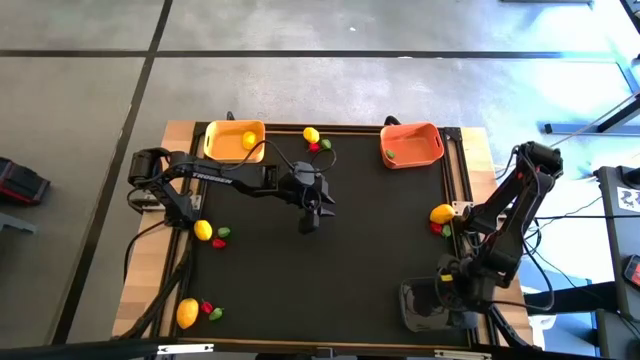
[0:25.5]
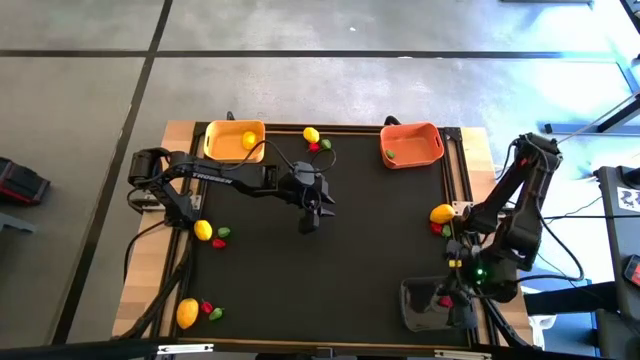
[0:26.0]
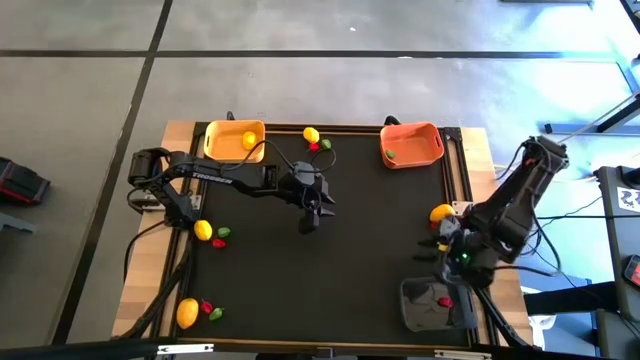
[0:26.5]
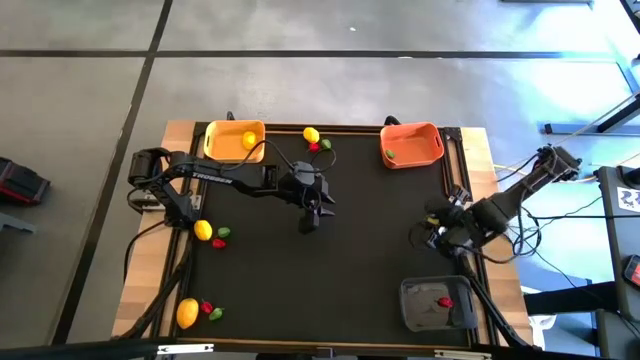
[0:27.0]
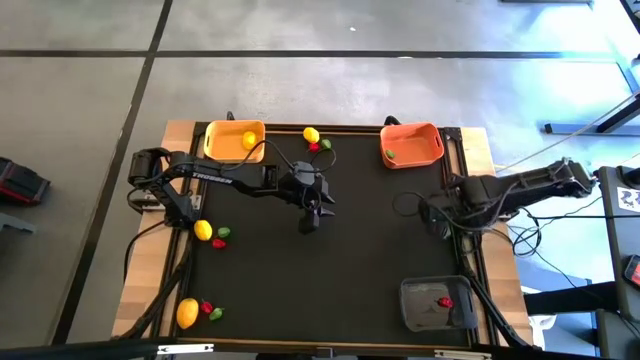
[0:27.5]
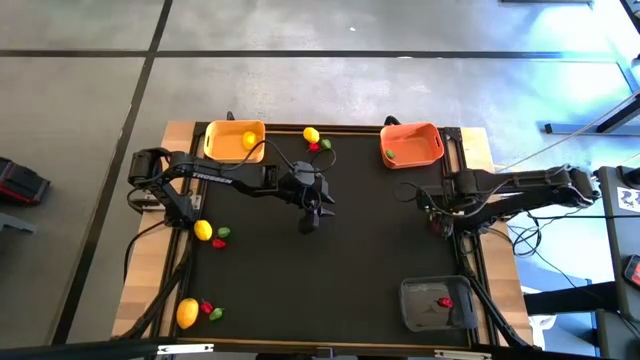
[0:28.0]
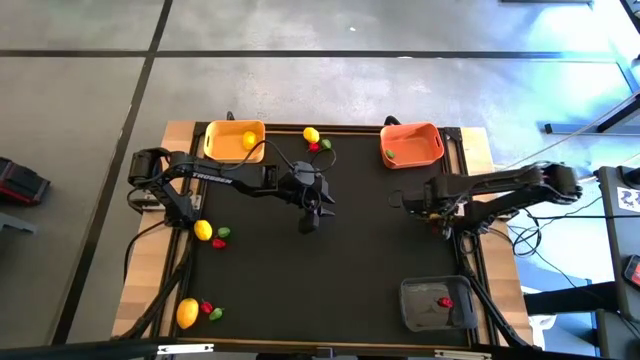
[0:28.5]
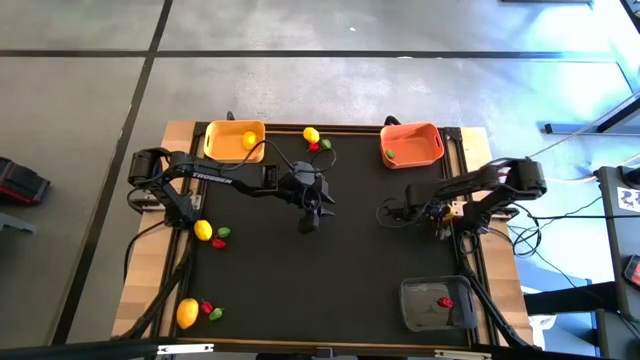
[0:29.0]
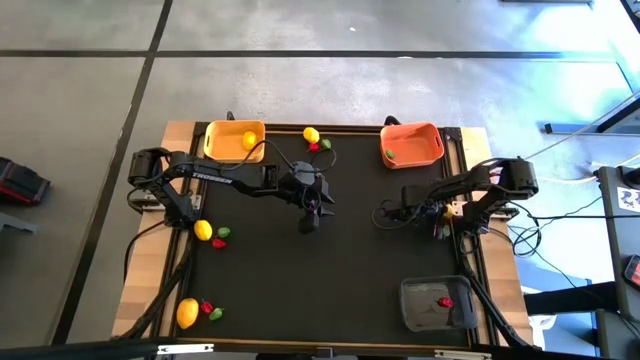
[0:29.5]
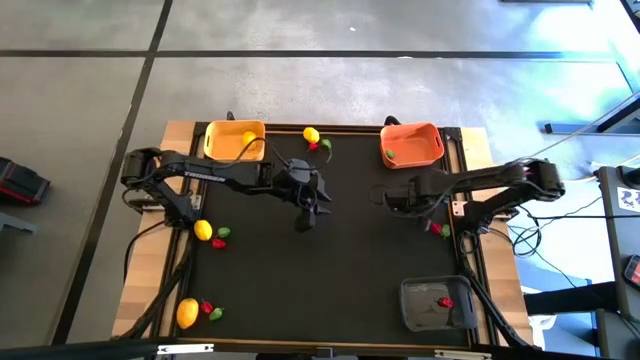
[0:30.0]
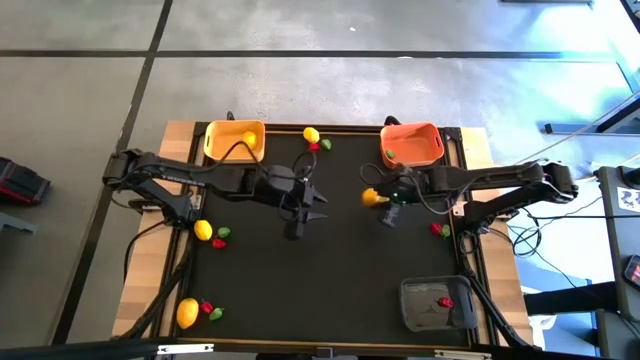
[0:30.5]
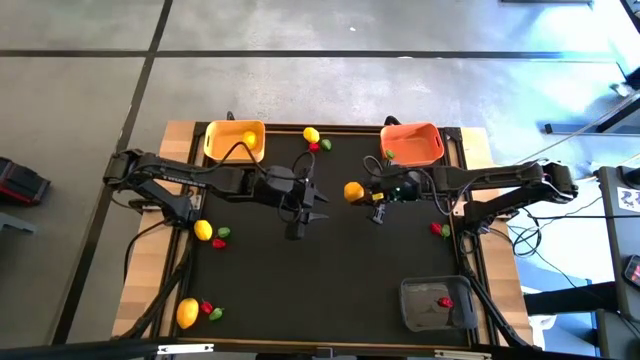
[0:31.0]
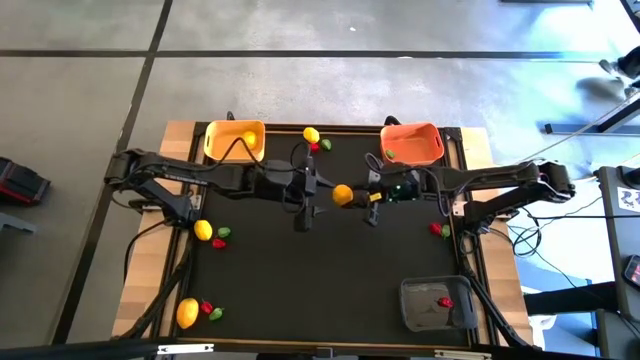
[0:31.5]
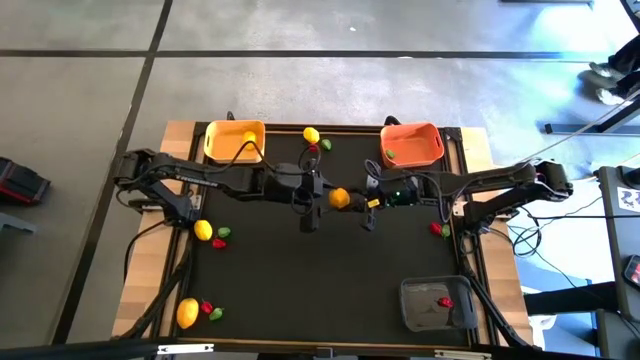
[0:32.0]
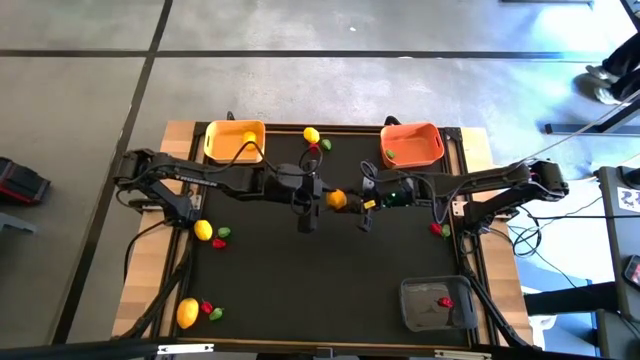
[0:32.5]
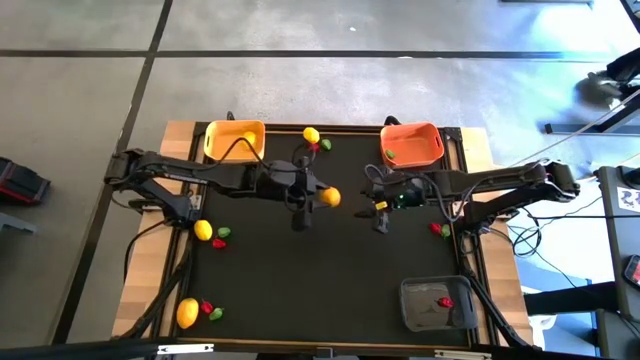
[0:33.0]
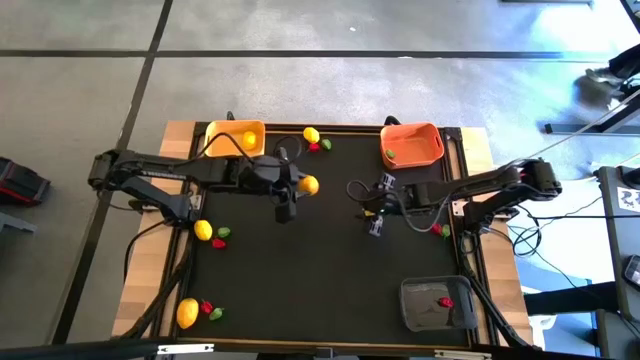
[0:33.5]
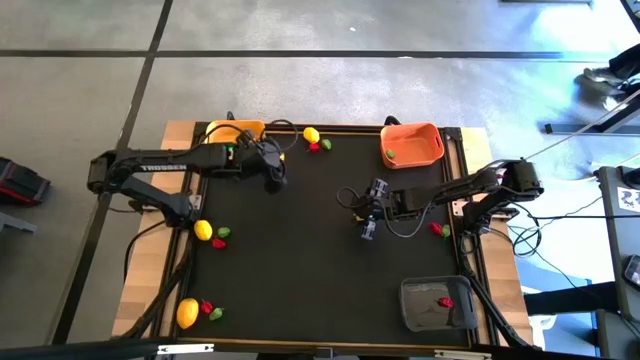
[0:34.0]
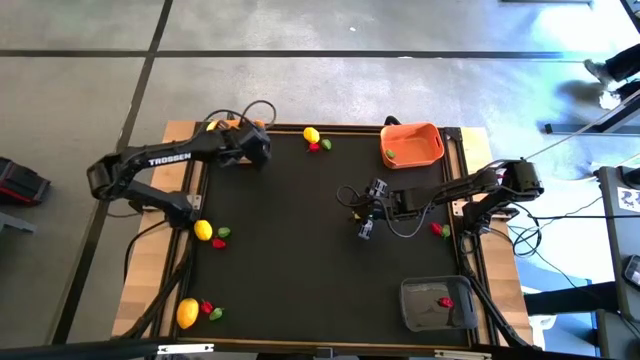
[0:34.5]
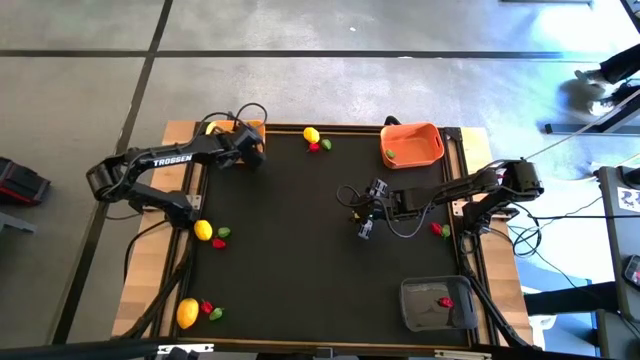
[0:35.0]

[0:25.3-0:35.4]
Task: Sort produce into baskets
Put the lemon into the yellow bin

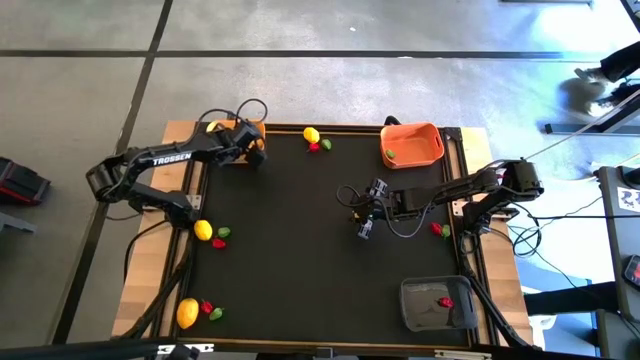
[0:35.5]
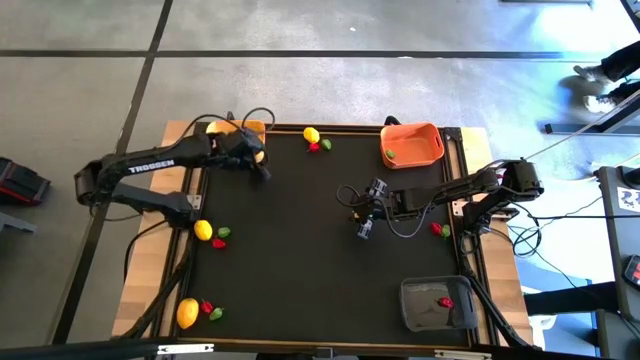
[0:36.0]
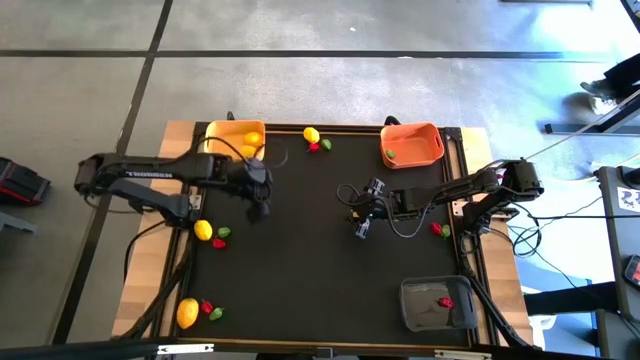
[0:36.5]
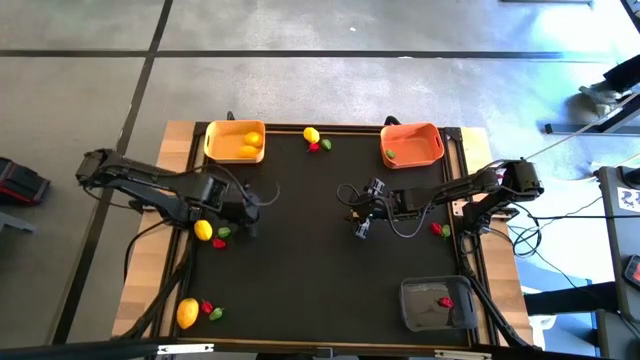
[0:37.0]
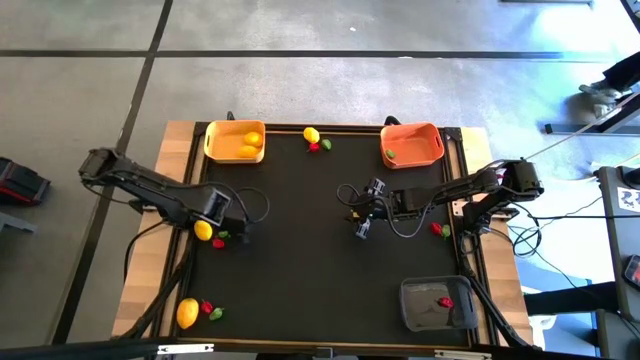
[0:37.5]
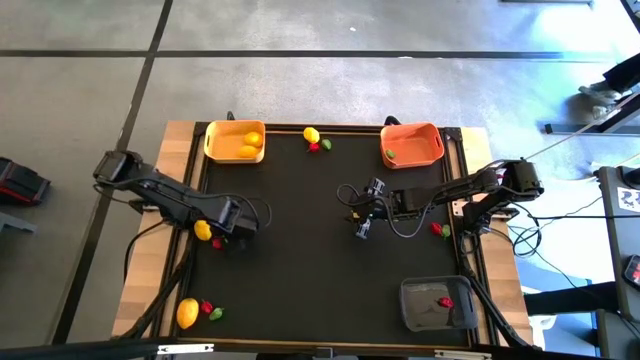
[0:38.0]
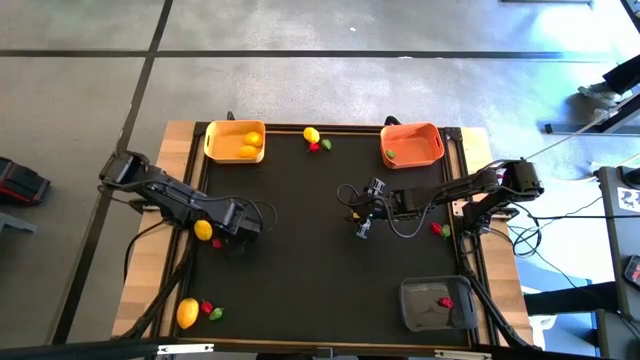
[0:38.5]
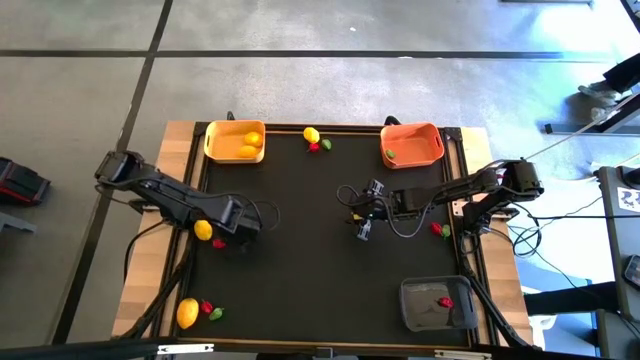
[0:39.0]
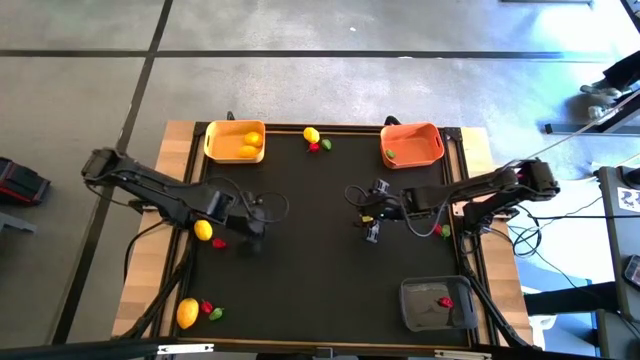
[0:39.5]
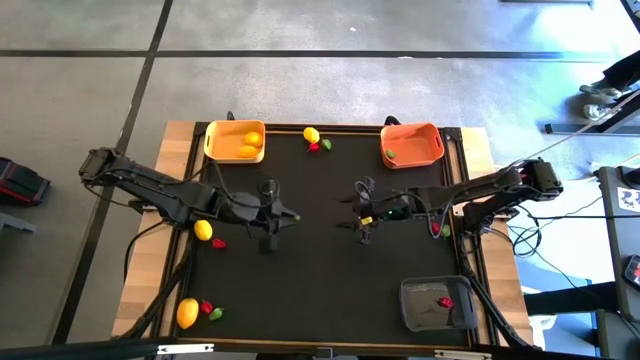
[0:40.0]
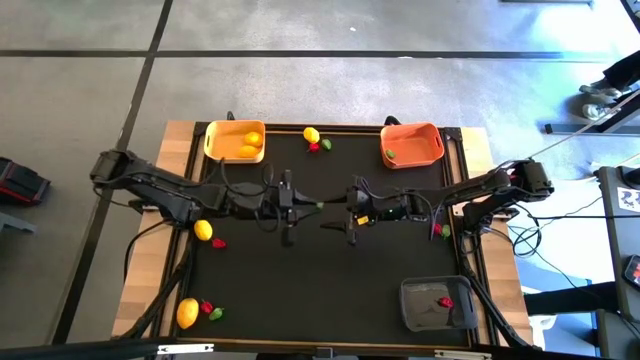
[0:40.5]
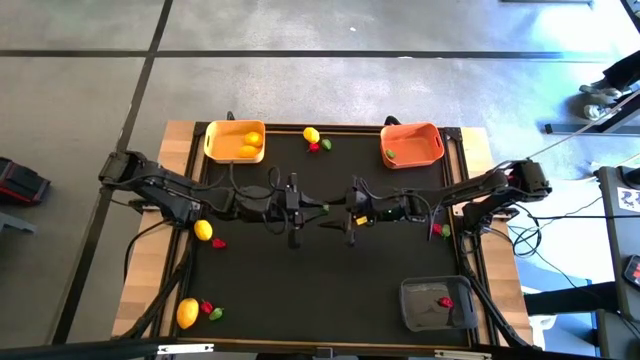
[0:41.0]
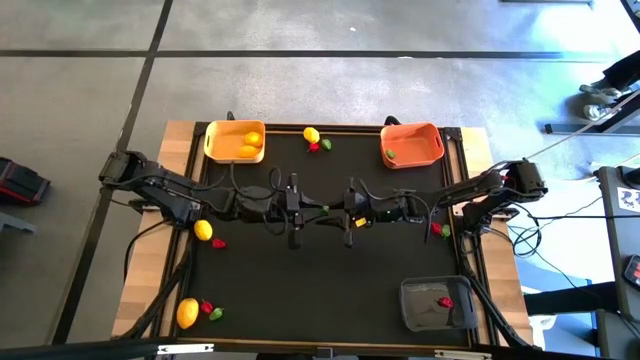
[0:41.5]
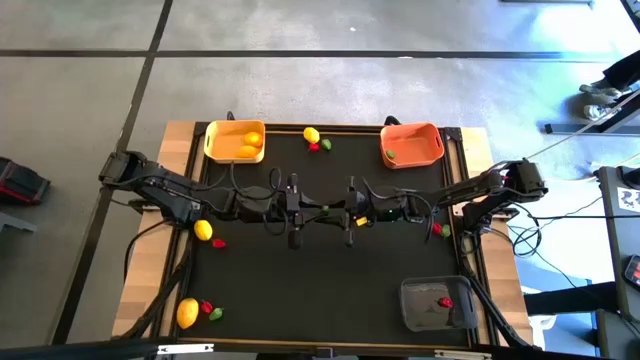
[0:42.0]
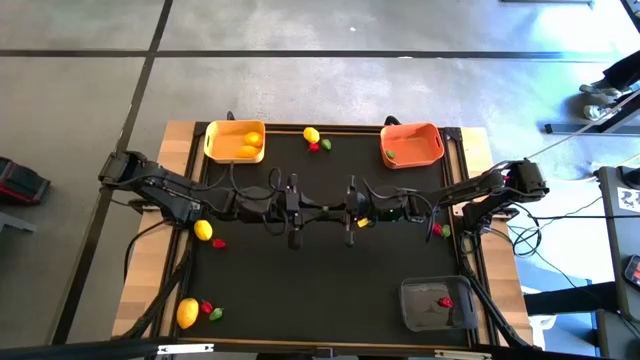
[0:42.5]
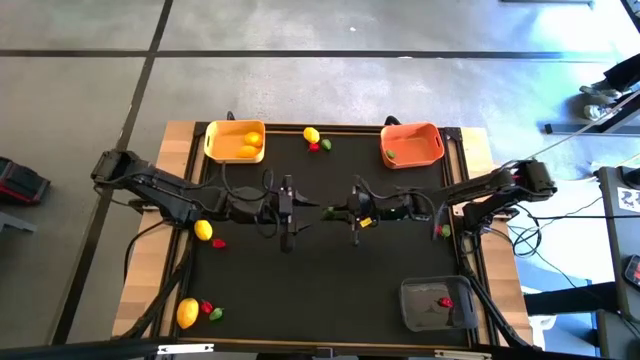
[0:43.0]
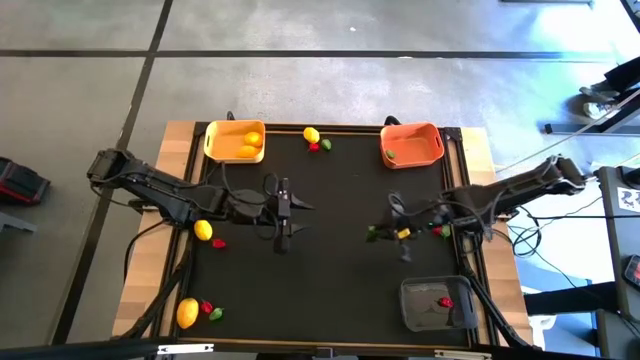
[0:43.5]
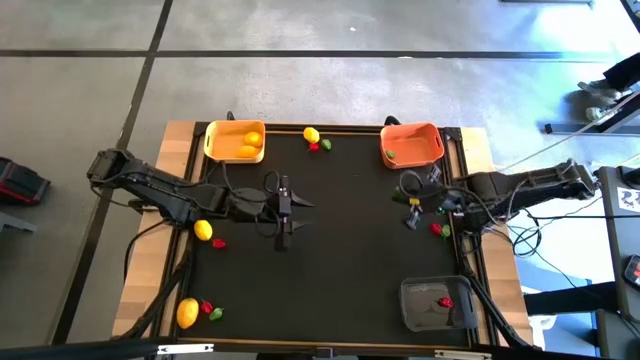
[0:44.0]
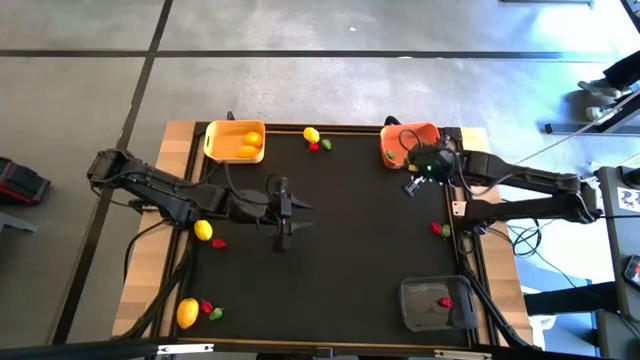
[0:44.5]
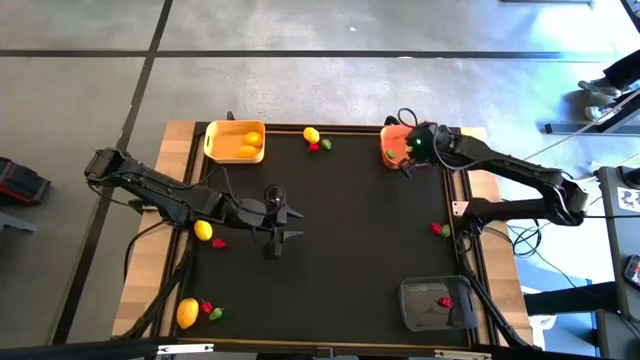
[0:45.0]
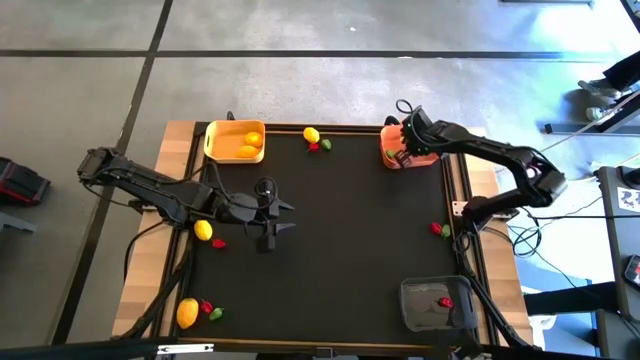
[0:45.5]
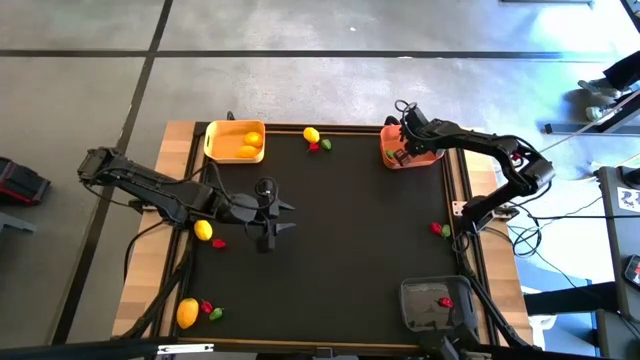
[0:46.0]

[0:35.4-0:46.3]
Put the green chili pepper into the orange bin

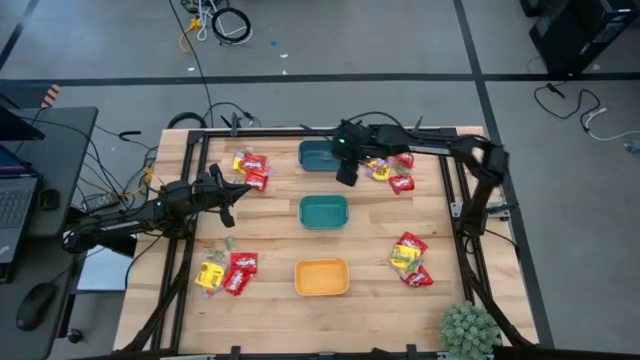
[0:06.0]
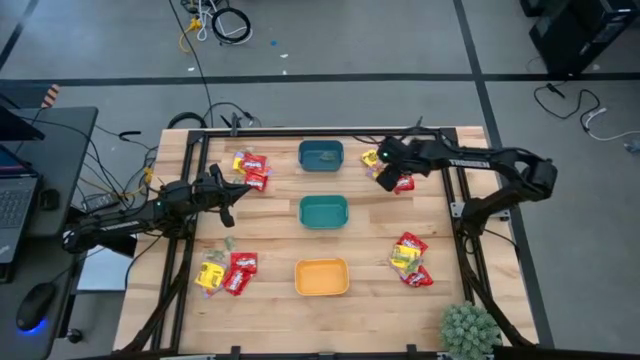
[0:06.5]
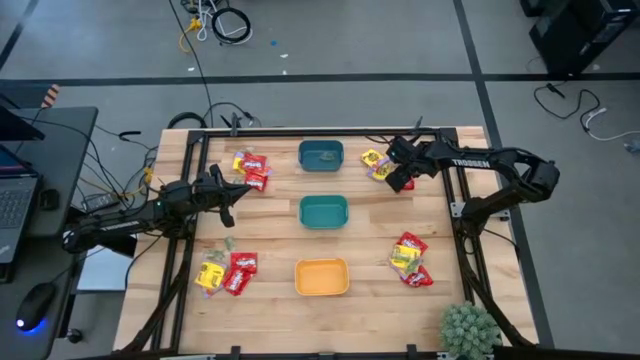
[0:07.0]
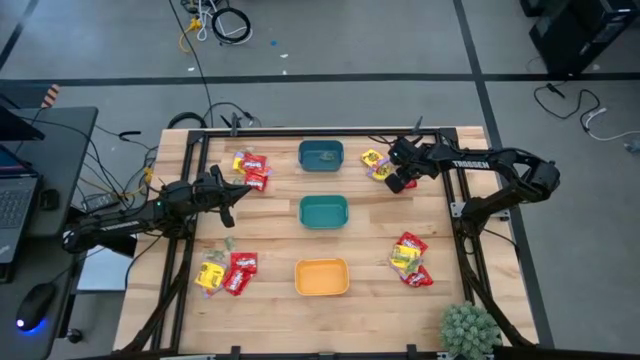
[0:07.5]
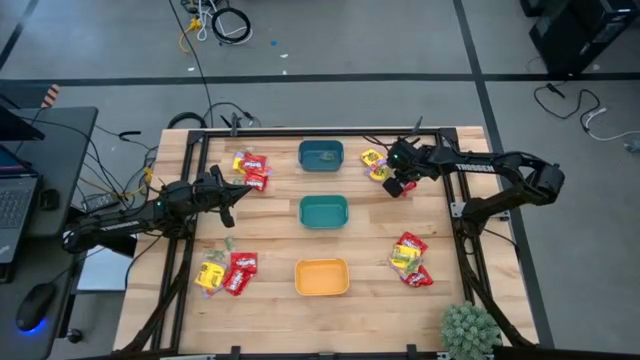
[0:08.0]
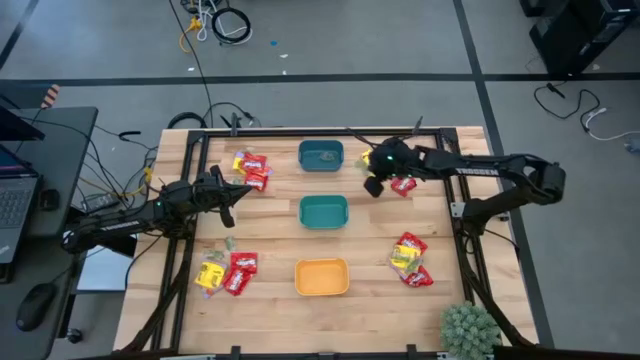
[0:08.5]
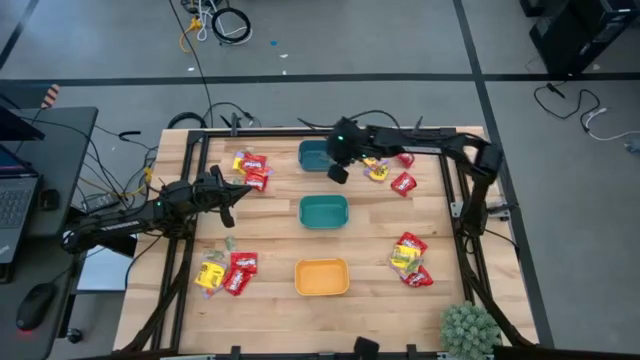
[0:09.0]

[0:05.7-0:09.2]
Task: Sort candy
Put the green gummy into the blue bin
